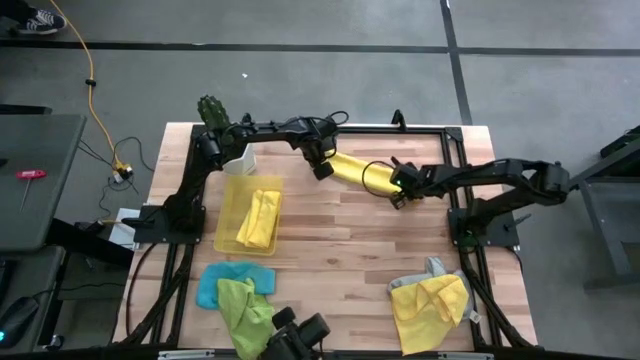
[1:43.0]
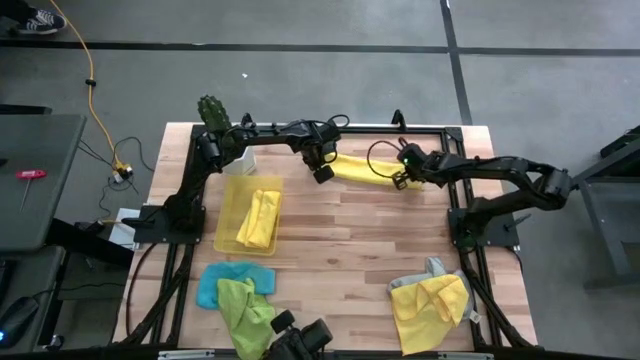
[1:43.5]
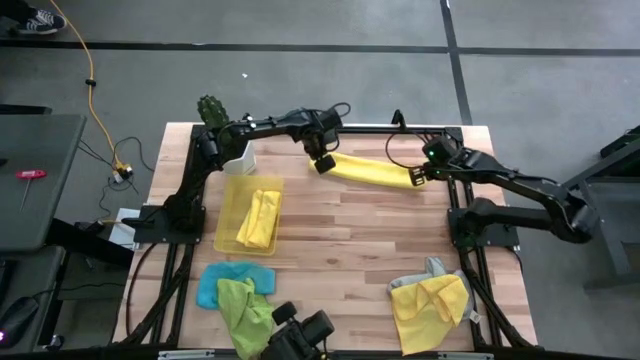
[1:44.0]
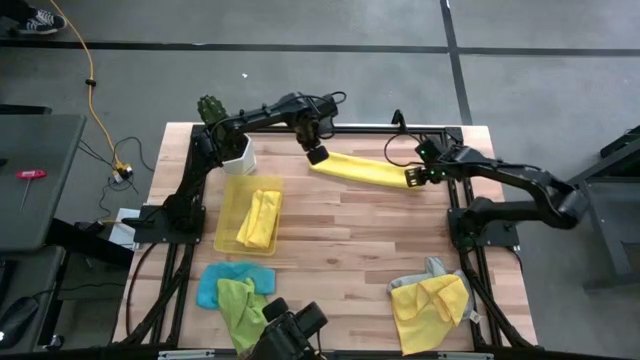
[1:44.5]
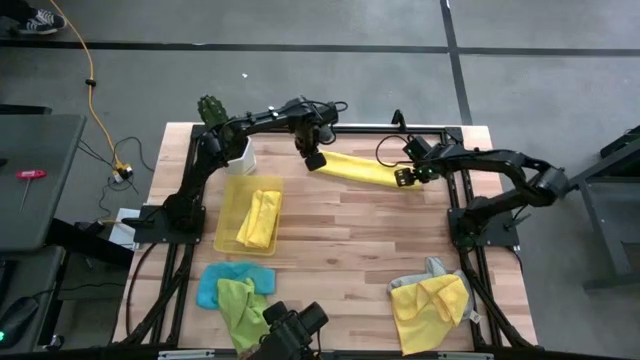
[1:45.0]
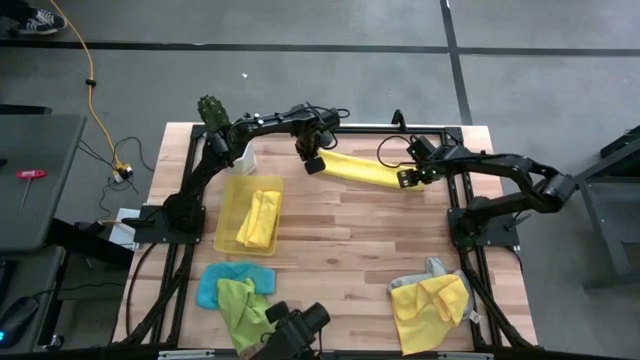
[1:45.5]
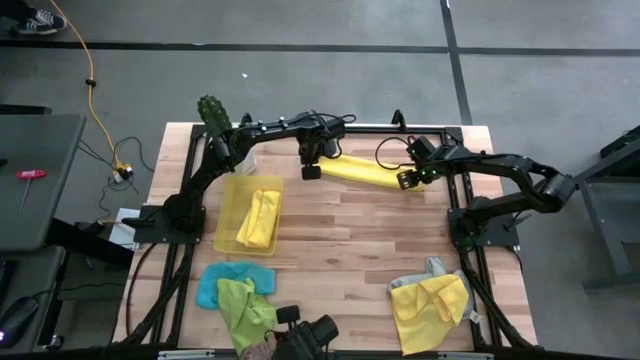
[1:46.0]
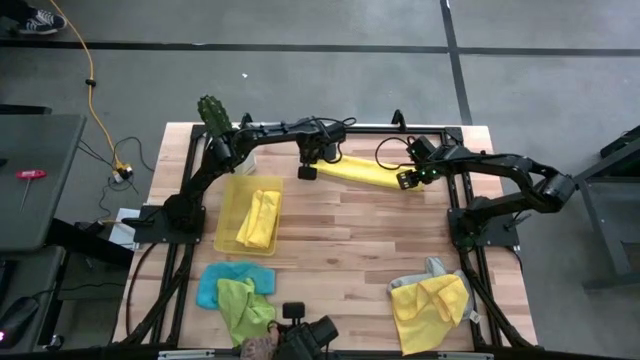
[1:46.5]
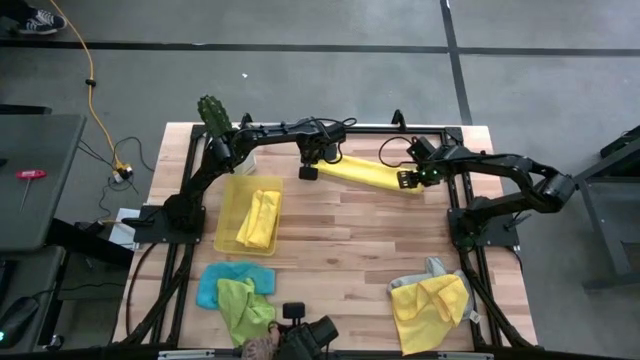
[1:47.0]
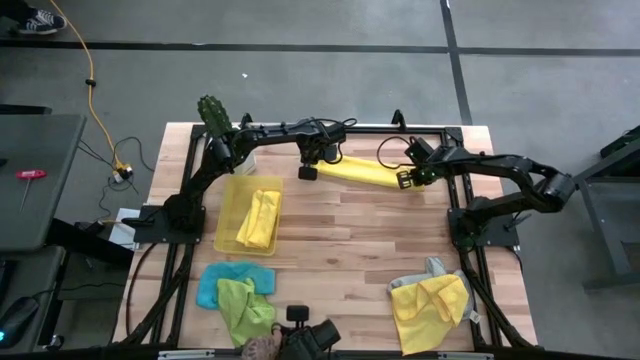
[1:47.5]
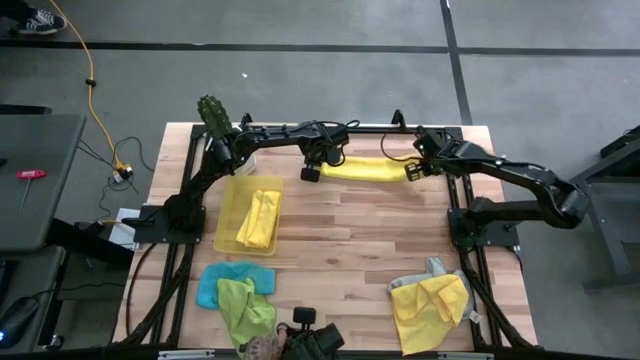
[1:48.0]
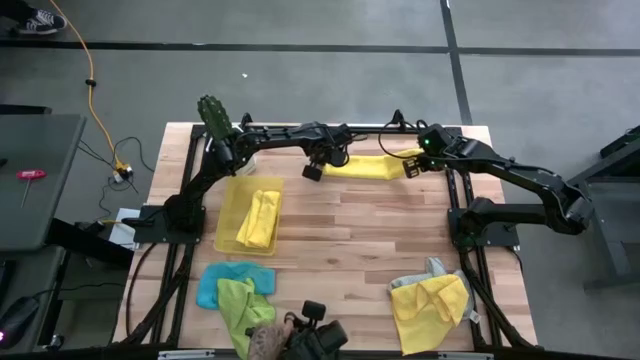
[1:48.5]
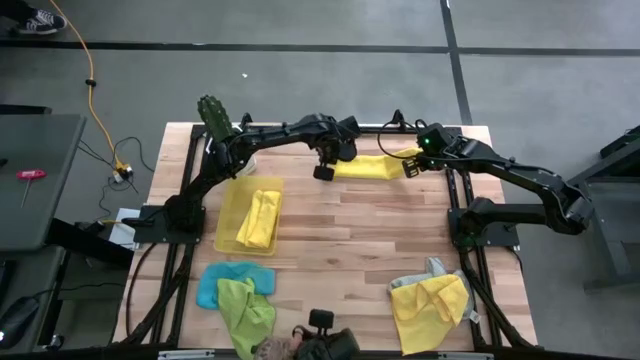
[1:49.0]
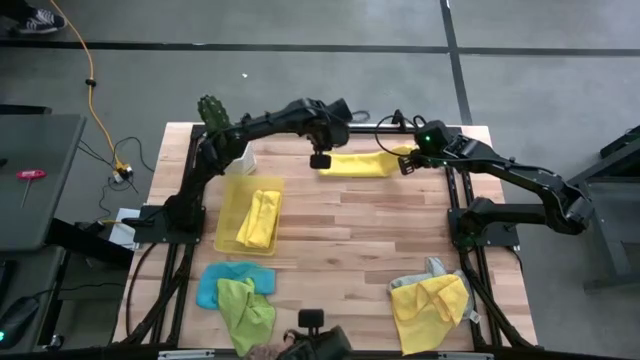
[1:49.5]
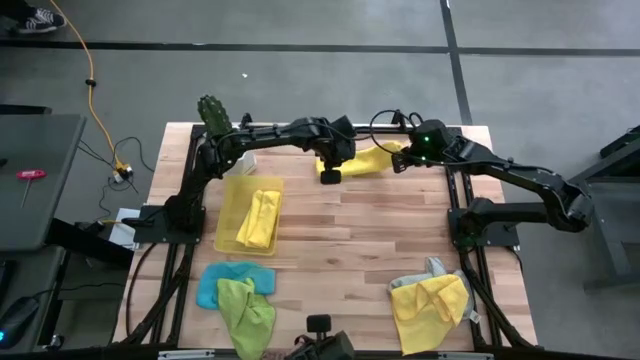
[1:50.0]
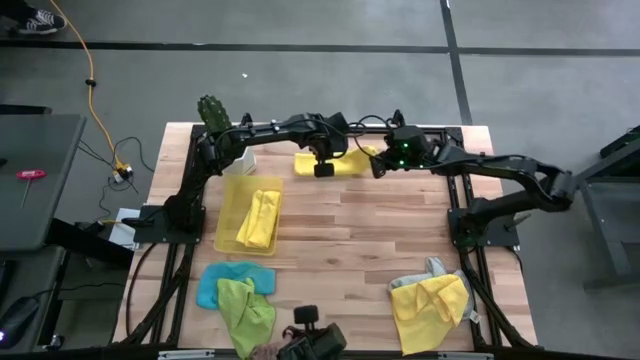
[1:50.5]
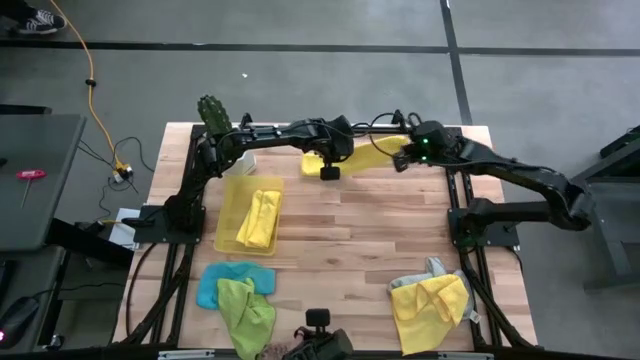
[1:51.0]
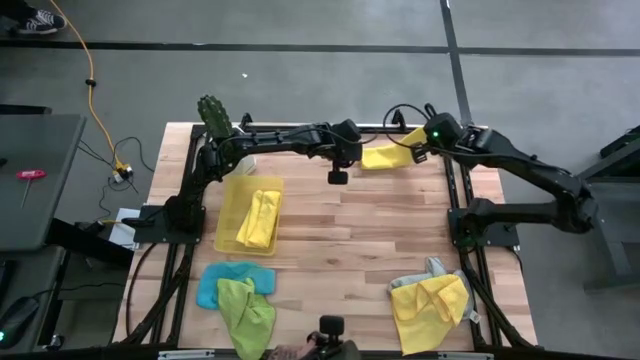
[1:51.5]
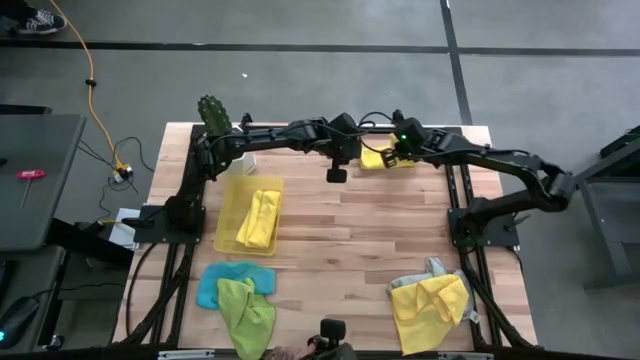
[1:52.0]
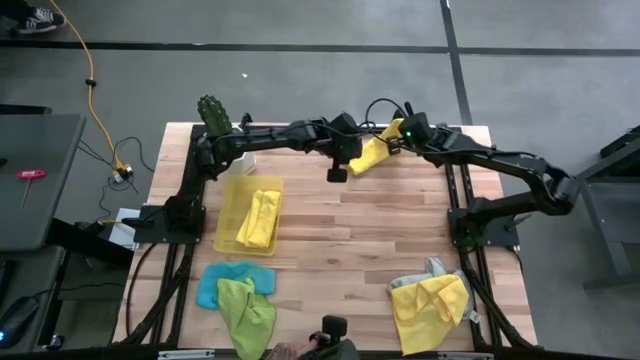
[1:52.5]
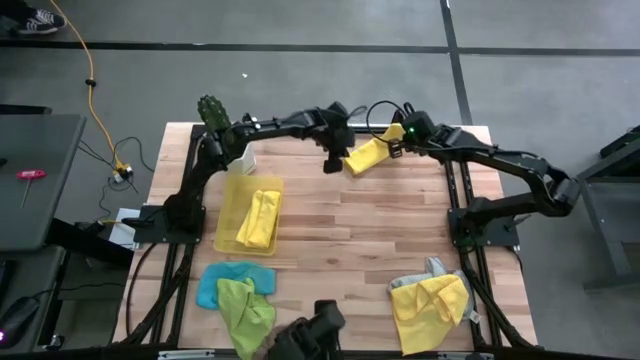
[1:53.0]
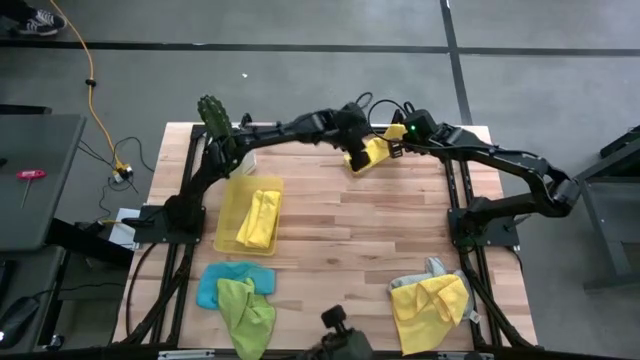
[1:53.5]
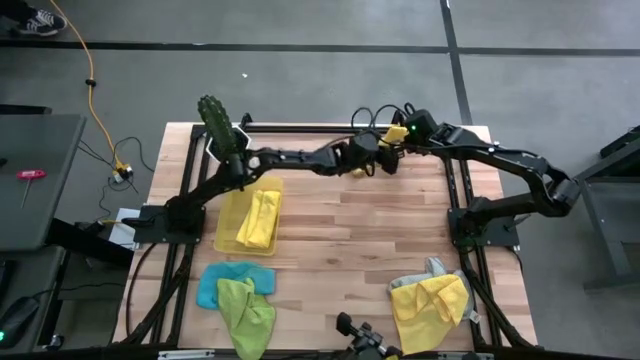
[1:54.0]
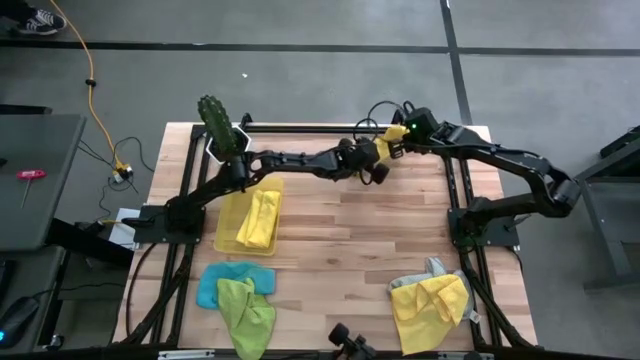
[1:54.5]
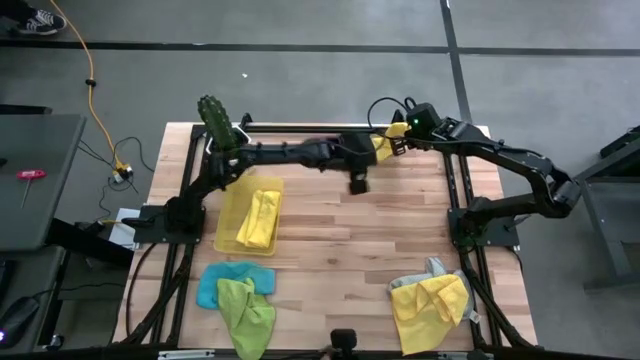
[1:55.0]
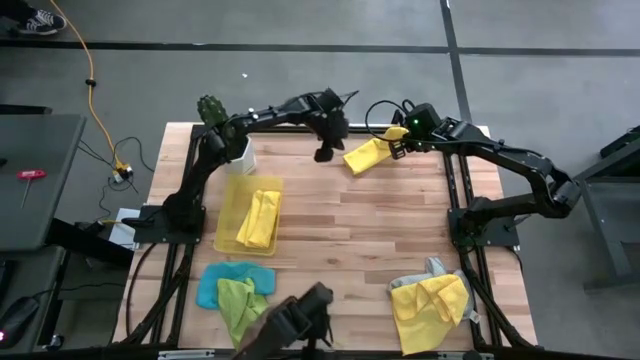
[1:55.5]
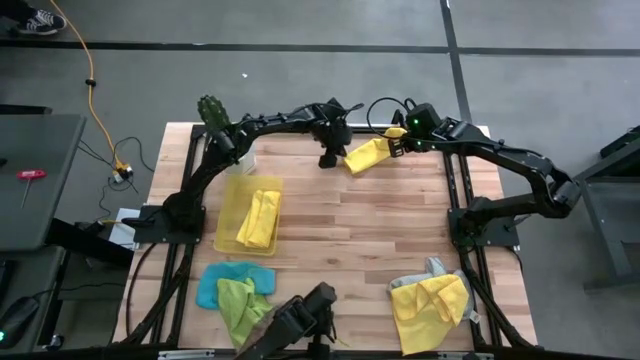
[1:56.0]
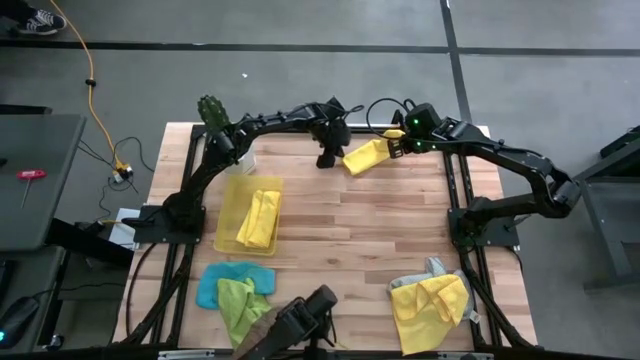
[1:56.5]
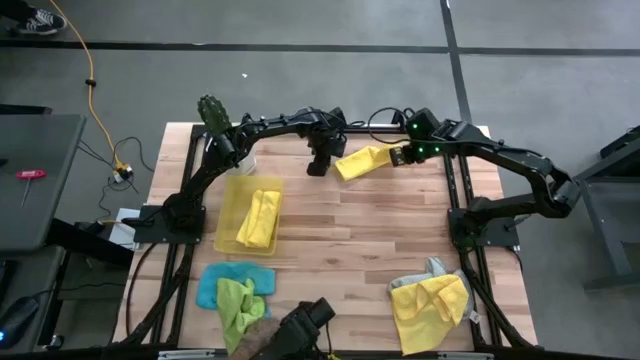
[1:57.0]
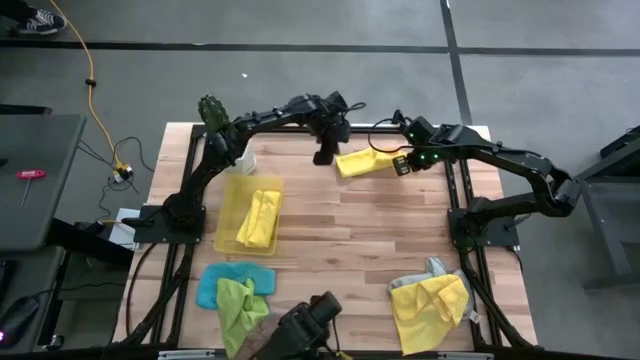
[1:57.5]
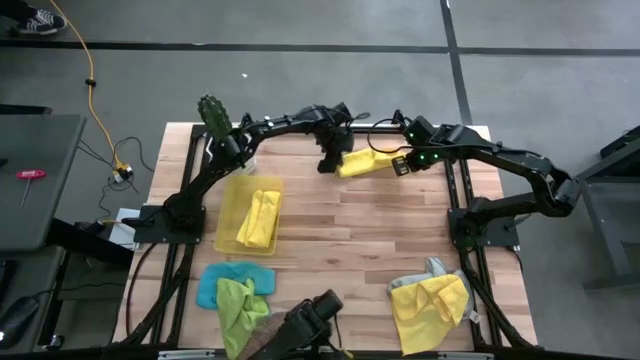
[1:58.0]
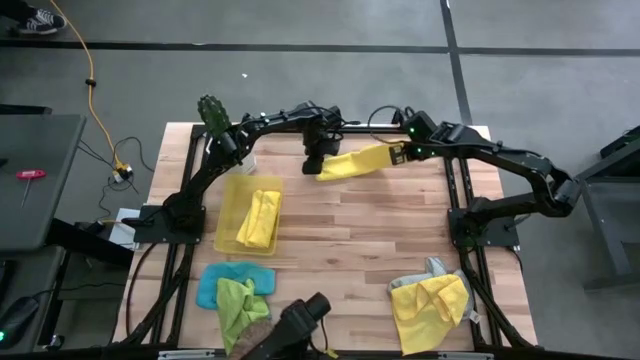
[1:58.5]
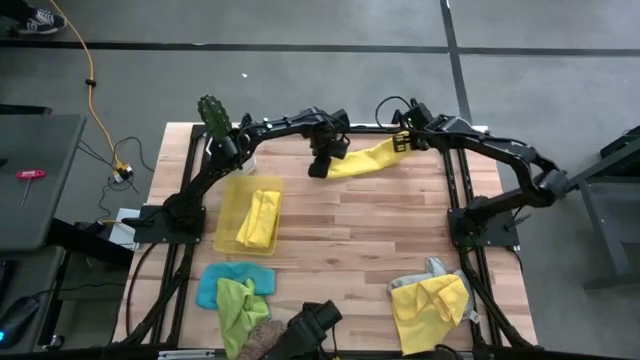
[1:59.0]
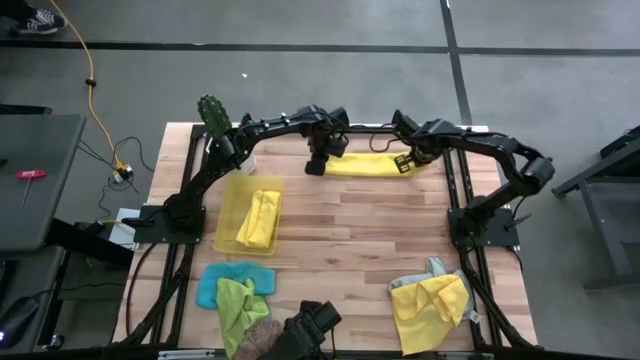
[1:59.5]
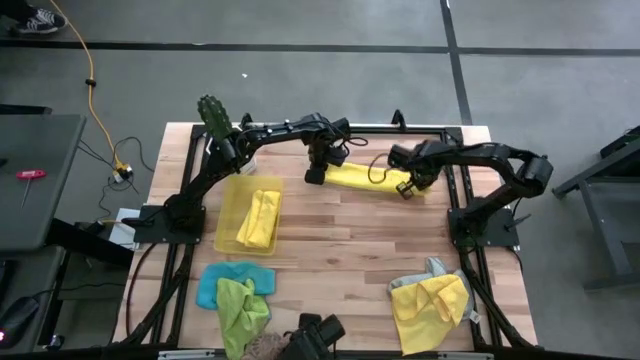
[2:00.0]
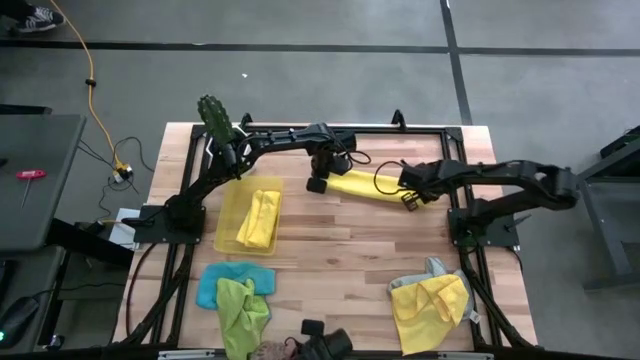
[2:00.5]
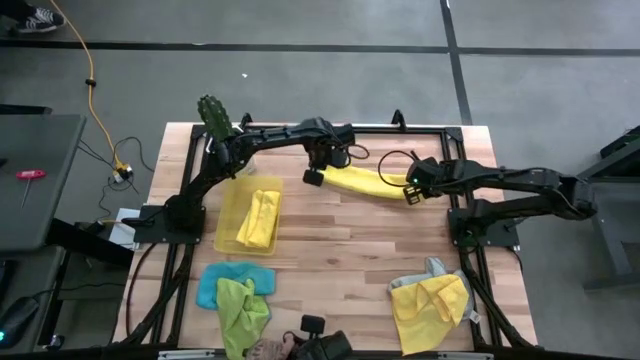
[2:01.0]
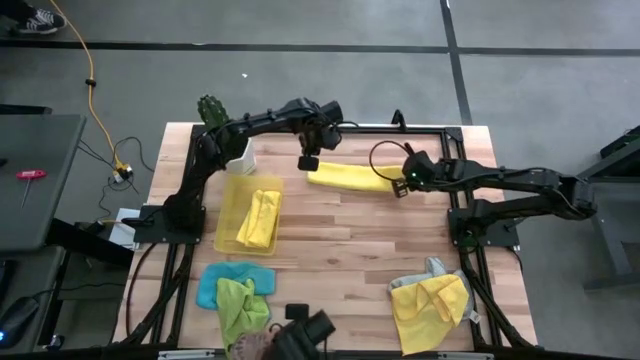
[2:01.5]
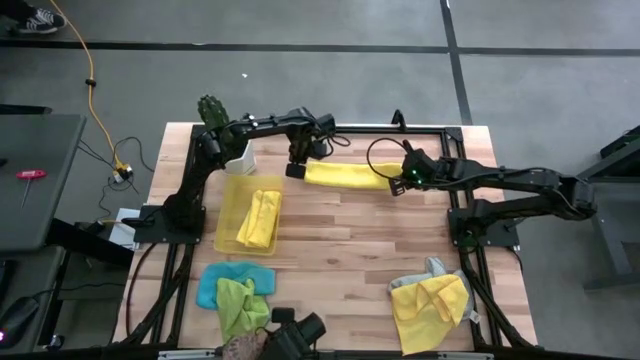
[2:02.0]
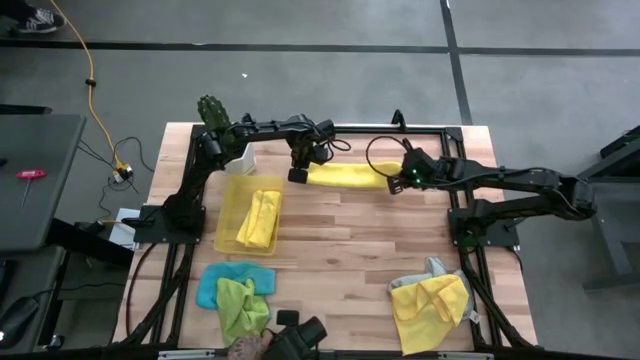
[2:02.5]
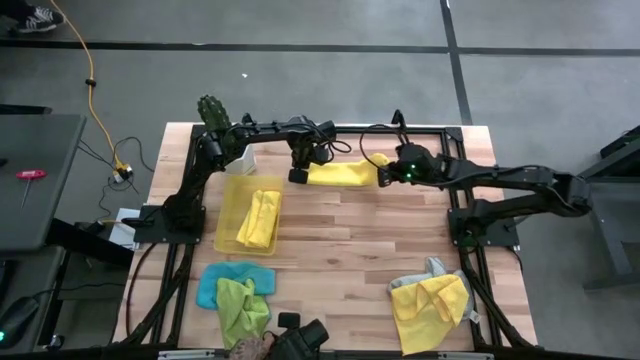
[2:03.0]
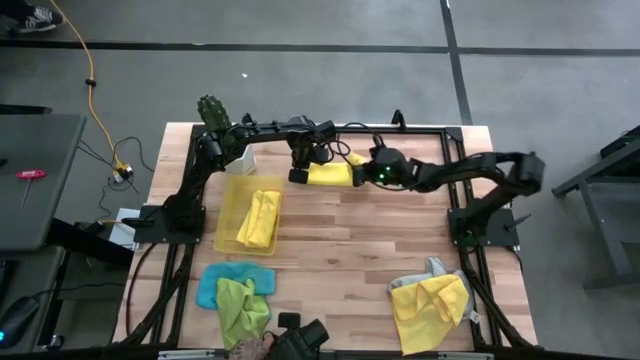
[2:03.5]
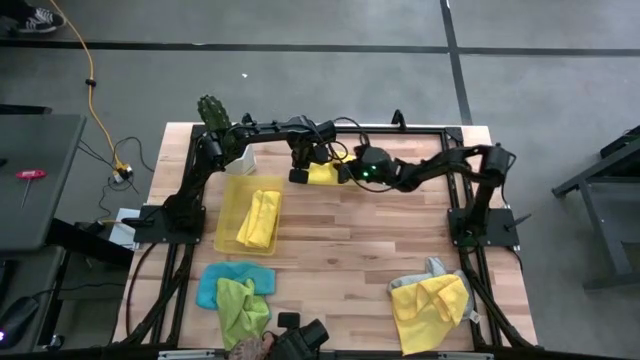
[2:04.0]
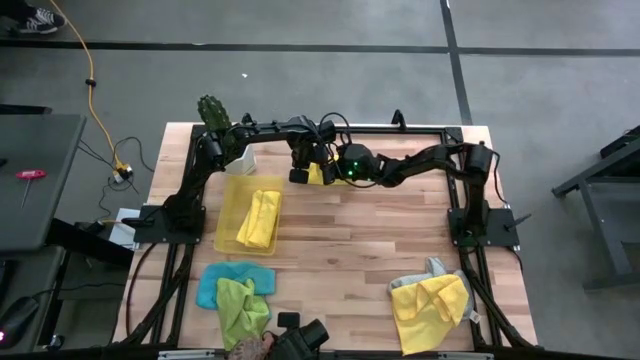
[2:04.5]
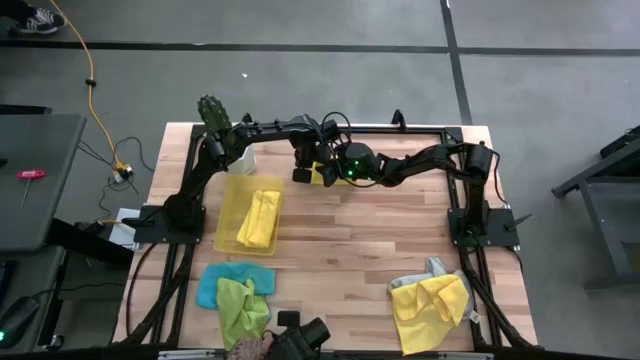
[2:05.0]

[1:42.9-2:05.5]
Task: Fold microfiber towels
Fold the top yellow microfiber towel
